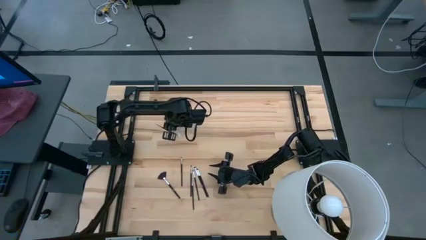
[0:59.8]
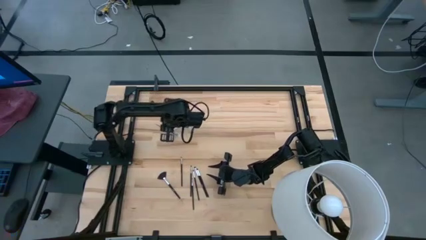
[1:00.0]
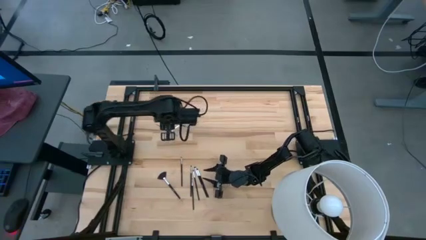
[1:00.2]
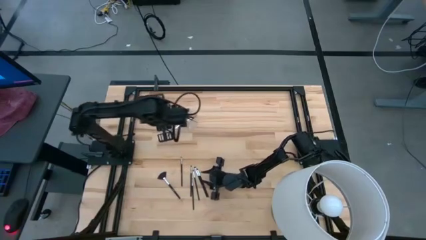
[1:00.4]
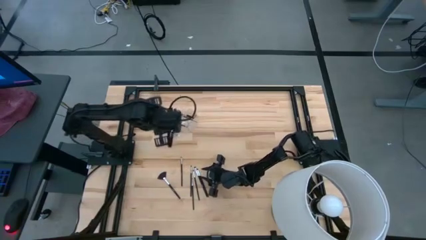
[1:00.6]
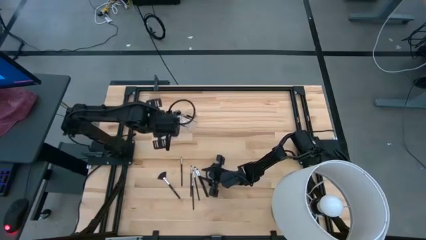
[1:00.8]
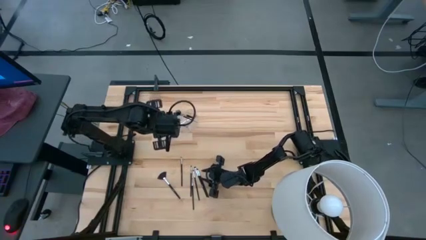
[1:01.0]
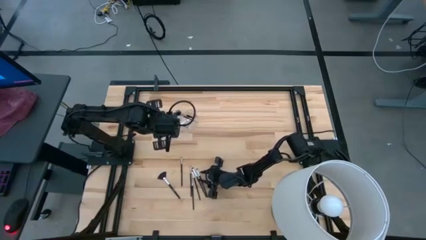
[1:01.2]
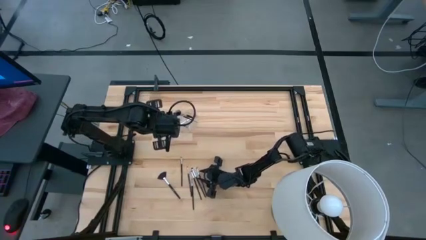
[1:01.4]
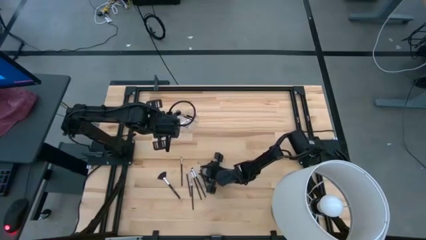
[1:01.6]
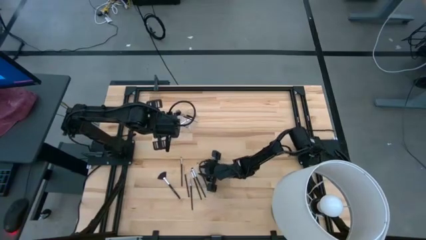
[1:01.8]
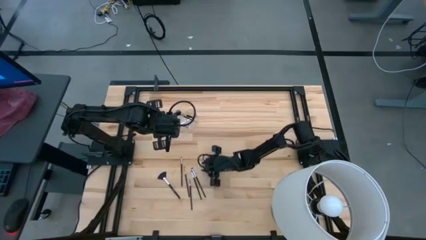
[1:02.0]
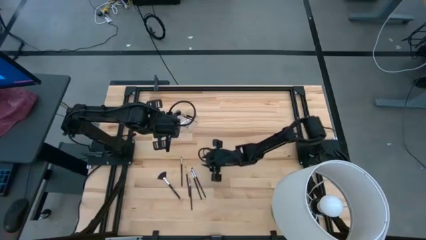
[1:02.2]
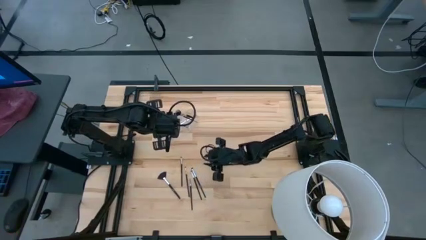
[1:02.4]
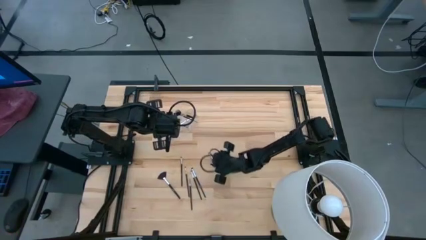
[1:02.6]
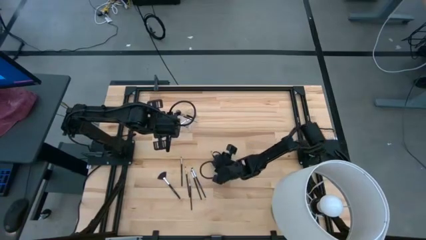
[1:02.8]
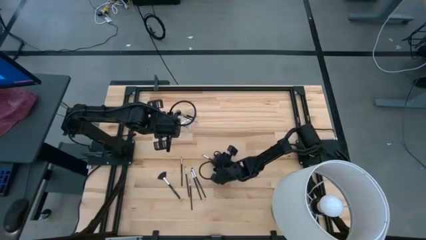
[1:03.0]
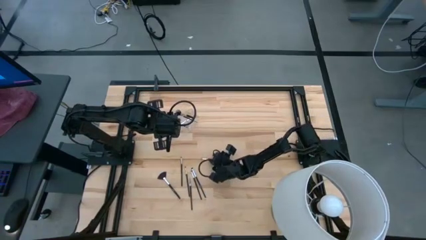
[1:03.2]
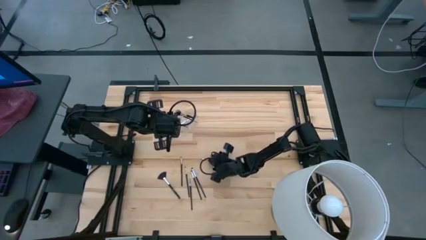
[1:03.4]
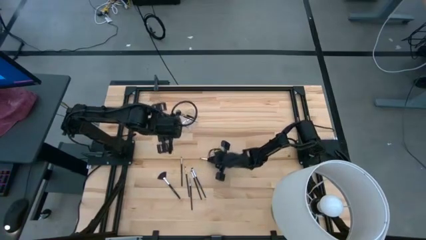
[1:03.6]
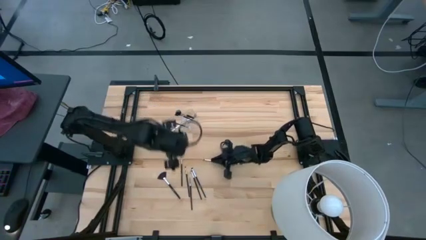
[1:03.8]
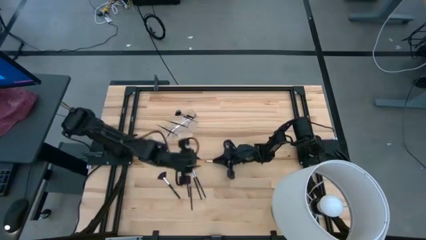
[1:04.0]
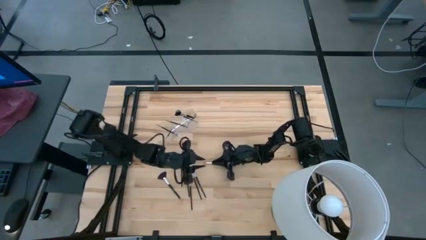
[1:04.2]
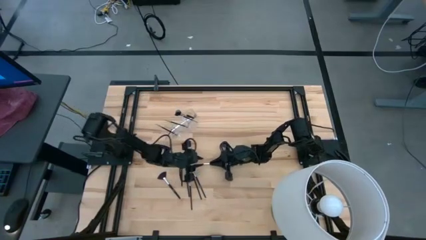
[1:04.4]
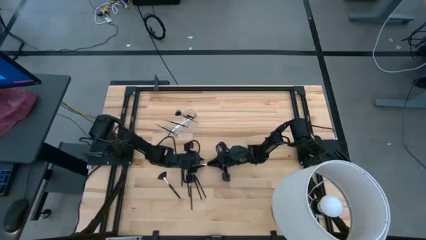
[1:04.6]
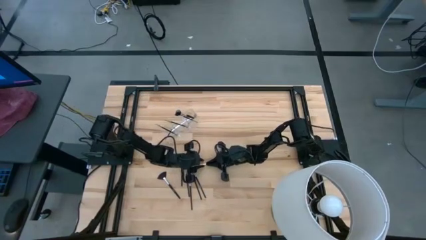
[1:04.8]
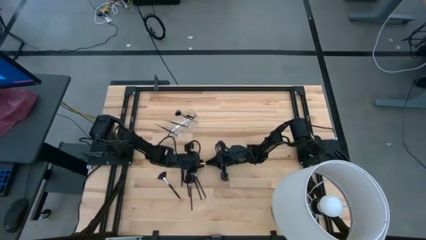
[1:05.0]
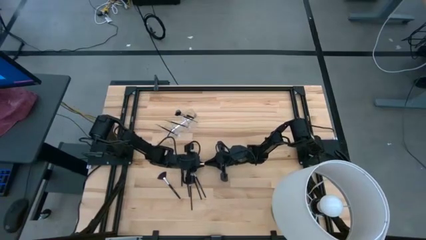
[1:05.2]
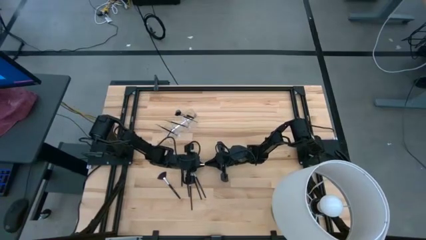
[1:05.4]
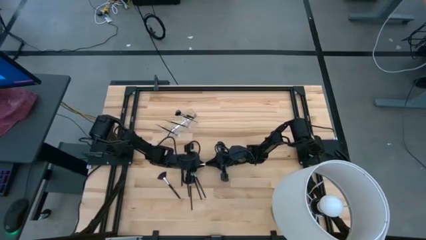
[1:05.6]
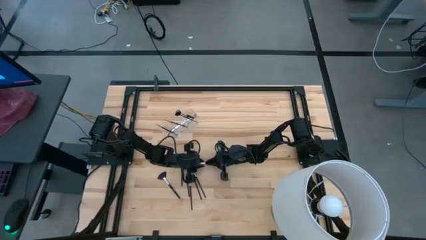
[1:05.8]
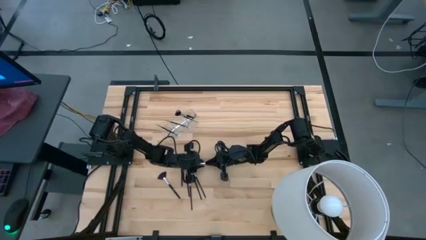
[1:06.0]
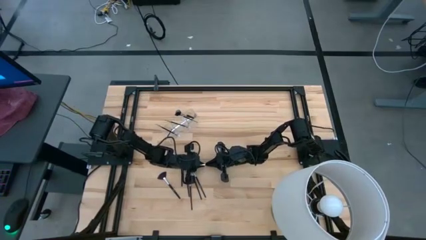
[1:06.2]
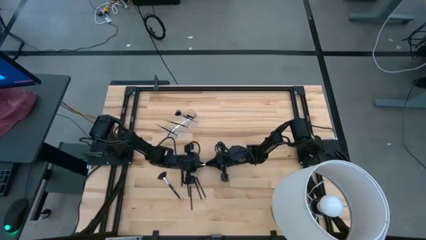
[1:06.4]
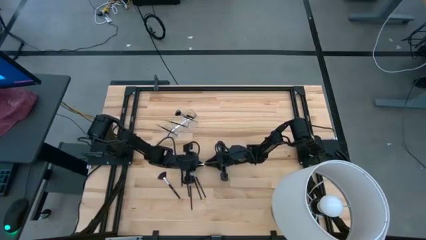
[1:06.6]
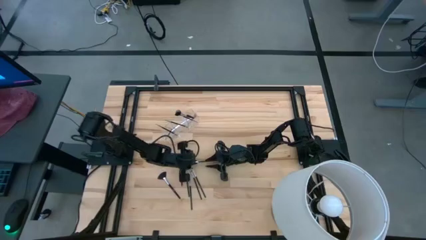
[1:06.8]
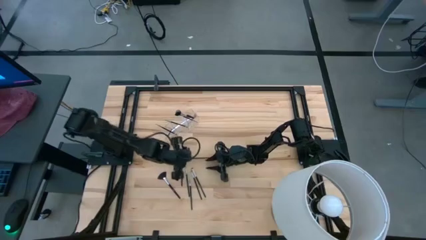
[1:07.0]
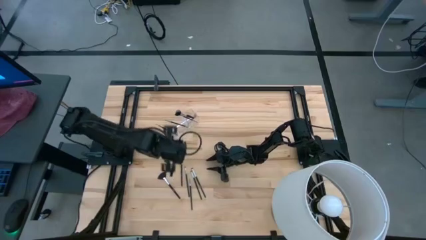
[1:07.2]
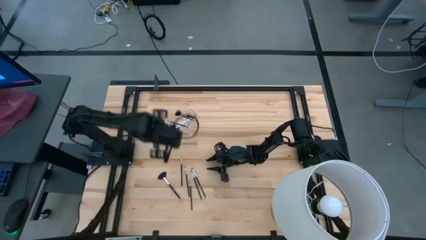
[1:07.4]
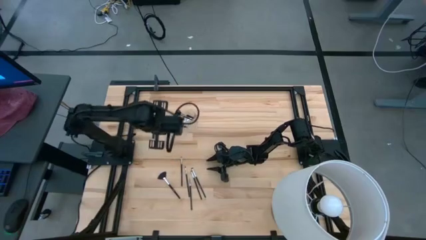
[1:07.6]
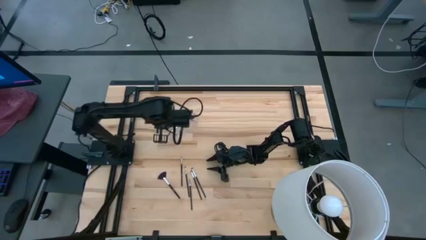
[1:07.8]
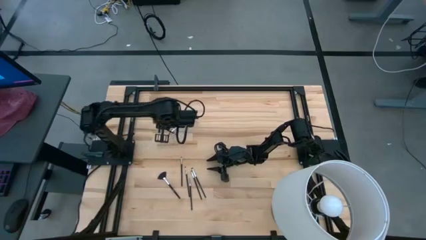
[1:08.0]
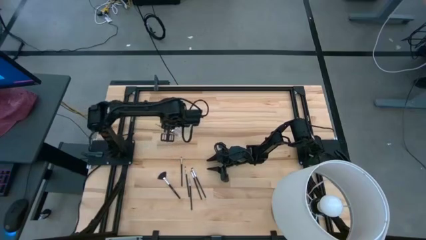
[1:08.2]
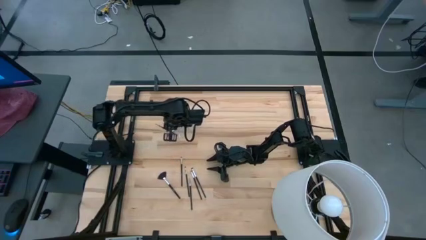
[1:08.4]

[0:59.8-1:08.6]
Task: Put items in baskets/containers
Put the eyeshadow brush into the middle section of the transparent organizer

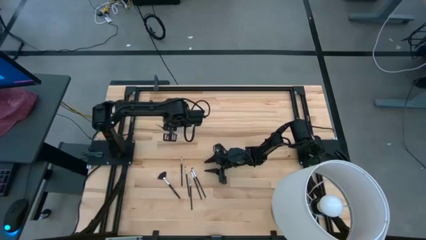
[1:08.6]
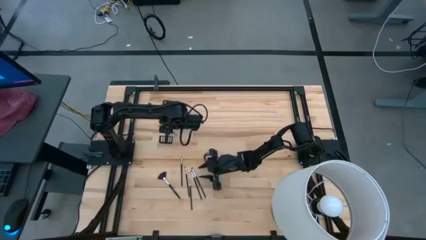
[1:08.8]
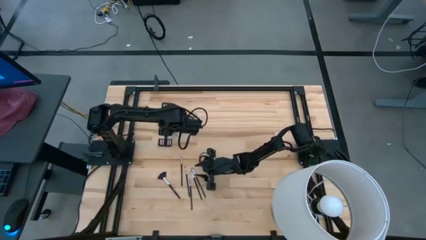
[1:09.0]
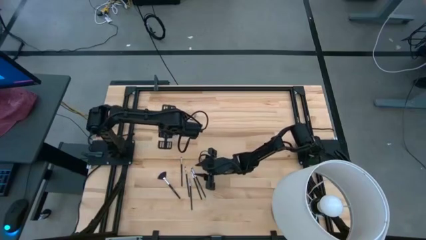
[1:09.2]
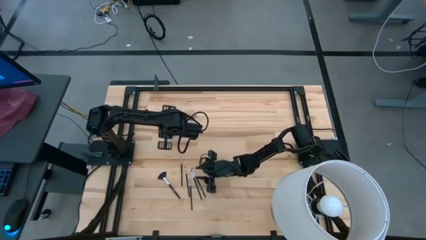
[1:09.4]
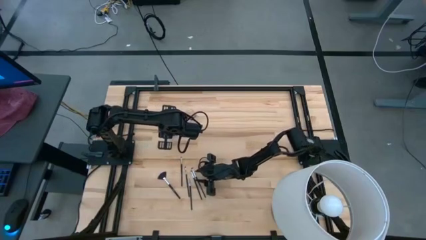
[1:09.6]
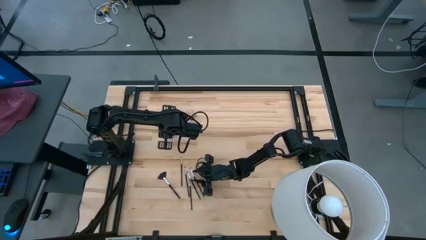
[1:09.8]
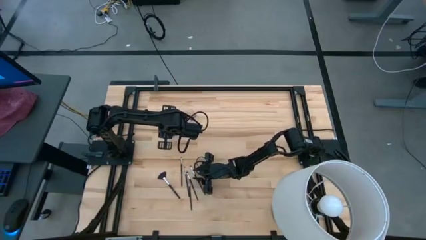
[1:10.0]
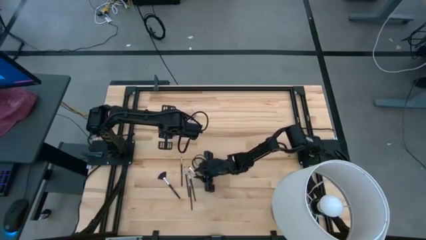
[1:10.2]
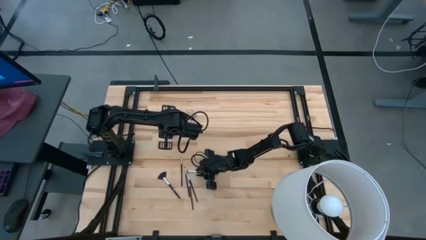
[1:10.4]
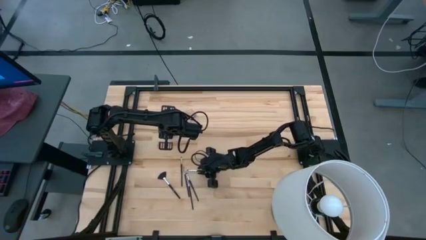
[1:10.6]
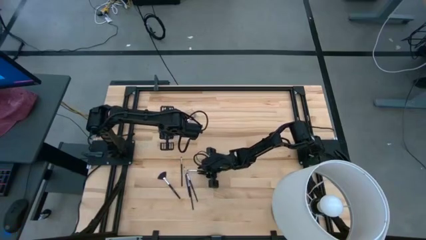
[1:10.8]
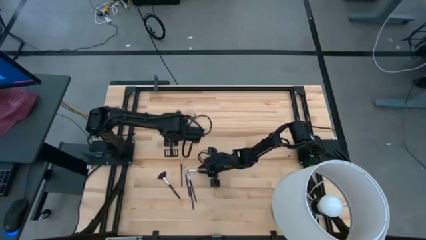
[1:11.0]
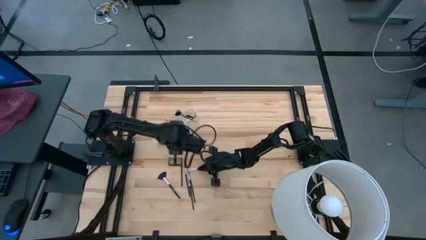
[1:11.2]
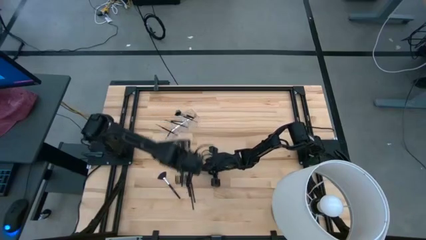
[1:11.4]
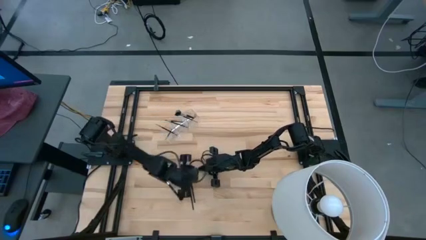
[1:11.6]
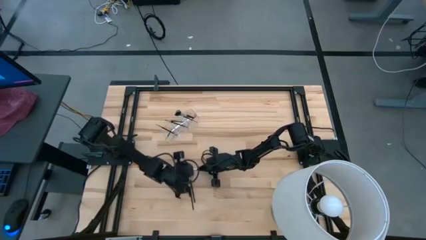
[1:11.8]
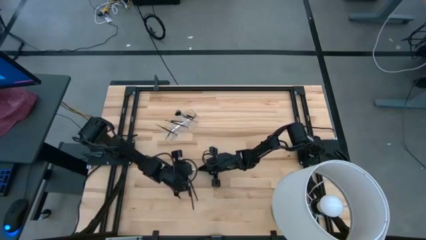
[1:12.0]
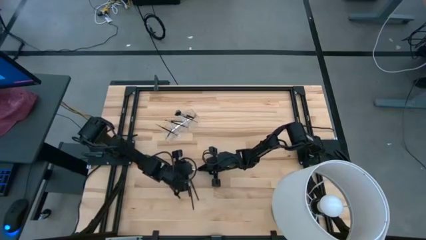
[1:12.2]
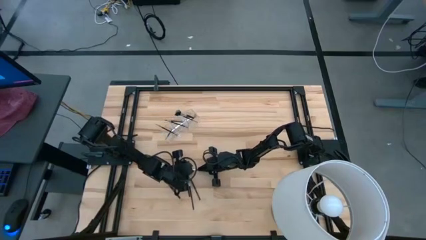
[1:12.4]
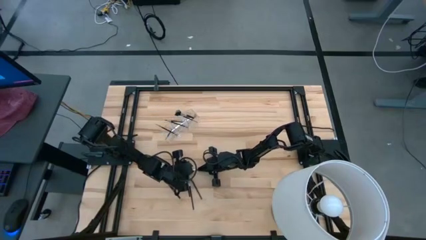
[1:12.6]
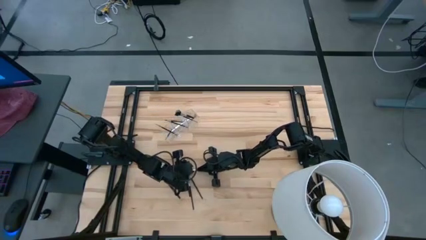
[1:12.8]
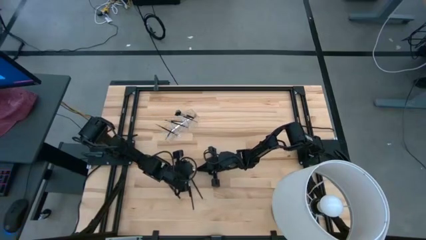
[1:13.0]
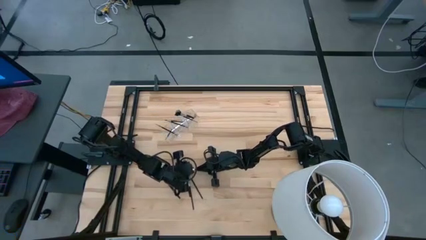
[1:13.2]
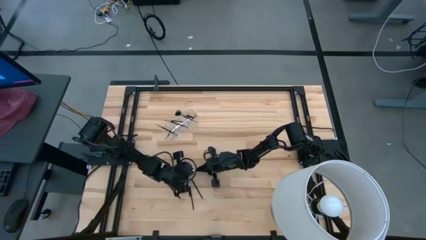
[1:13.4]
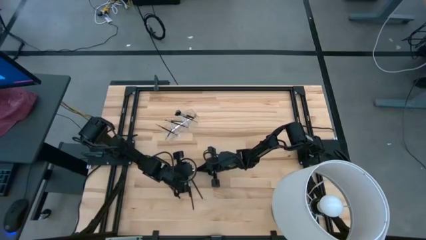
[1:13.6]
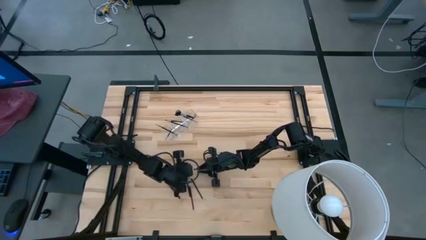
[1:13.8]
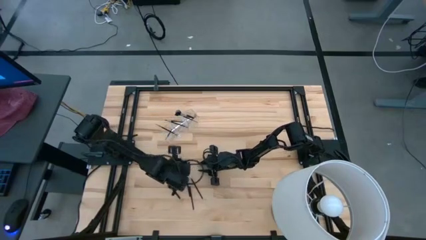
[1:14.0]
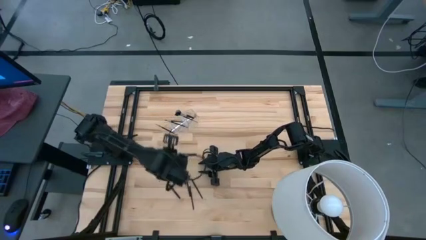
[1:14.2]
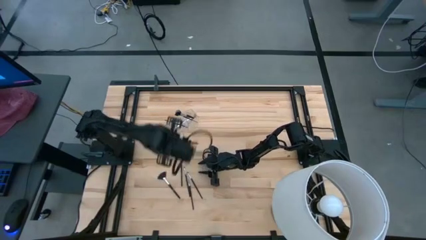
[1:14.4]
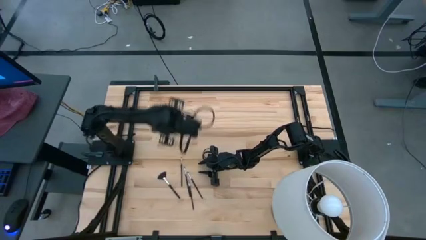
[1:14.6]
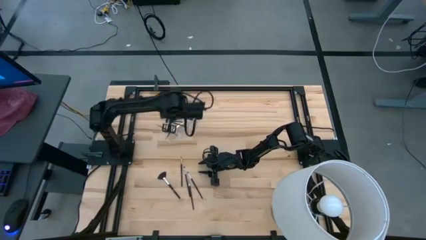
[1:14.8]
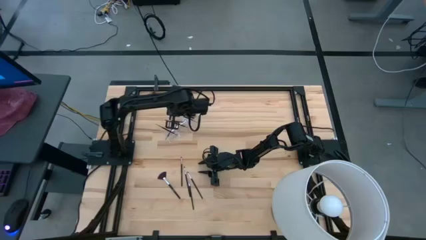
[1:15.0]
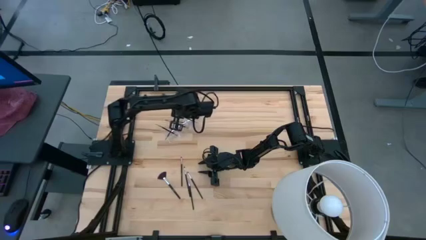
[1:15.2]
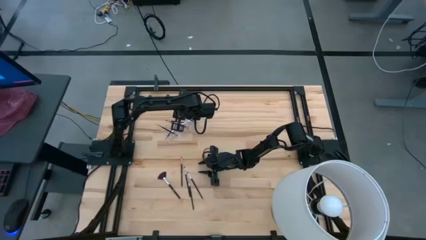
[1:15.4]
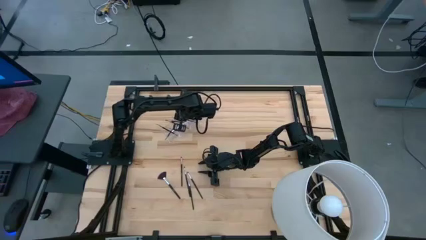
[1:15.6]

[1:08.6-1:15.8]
Put the eyeshadow brush into the right section of the transparent organizer

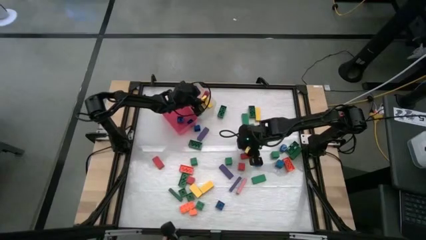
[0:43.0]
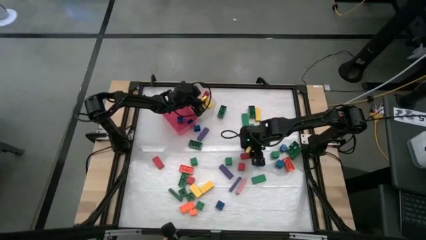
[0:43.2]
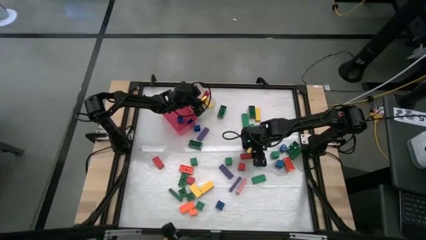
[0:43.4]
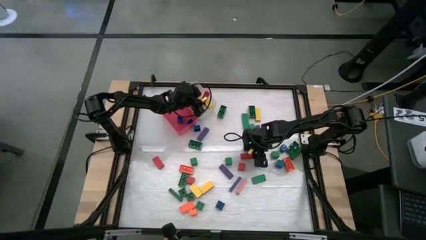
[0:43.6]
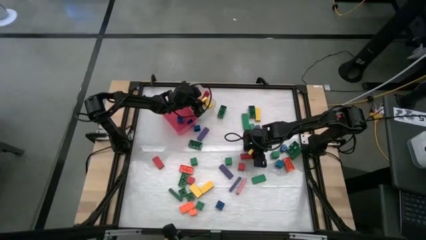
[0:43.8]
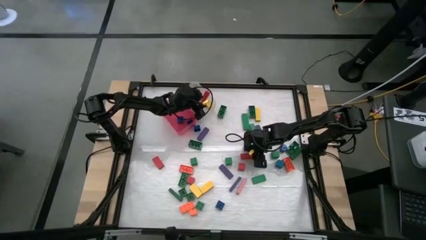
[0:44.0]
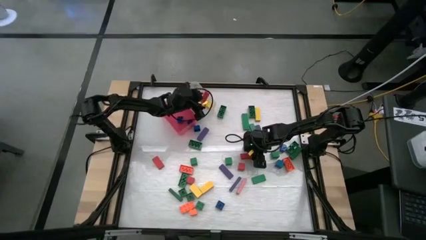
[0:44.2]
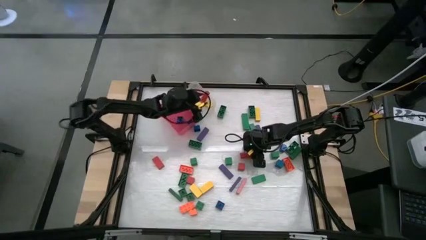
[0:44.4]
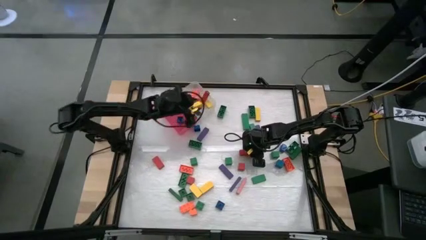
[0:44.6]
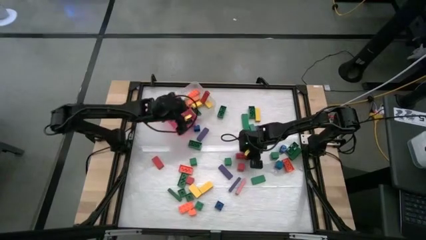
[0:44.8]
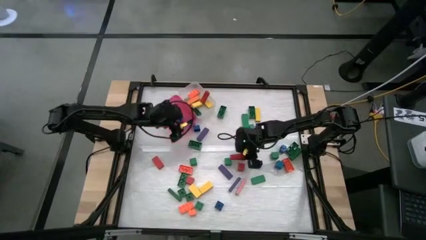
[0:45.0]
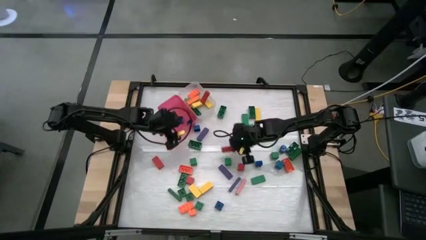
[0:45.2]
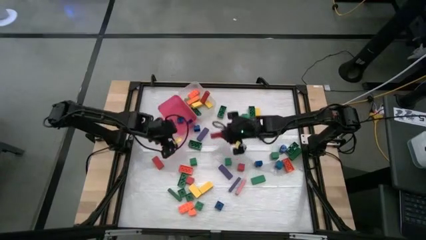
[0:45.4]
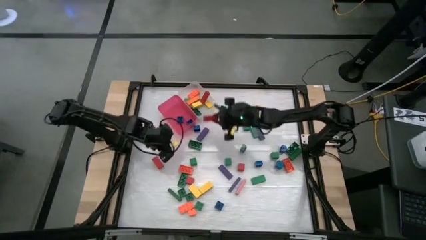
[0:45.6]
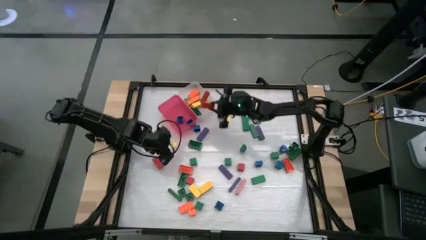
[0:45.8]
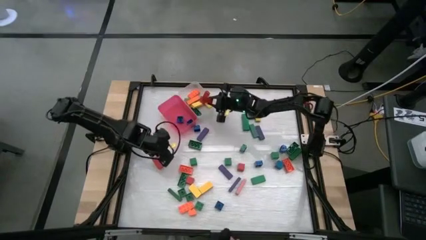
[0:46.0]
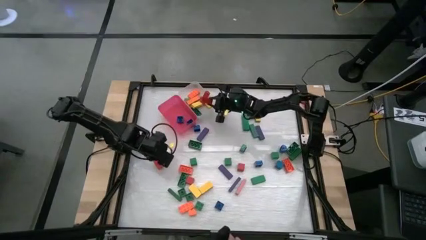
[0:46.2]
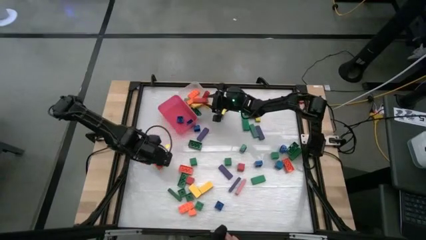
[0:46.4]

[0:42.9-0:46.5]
Task: Sort blocks by size
Put the big red block into the white bin
